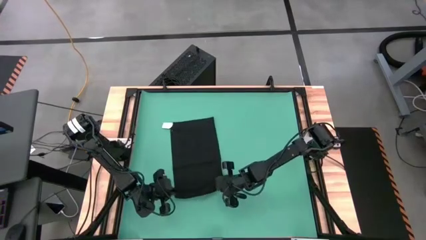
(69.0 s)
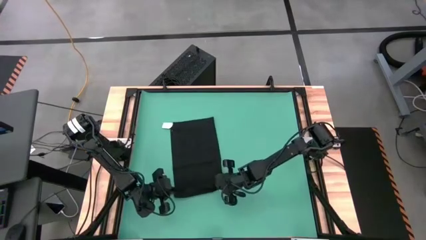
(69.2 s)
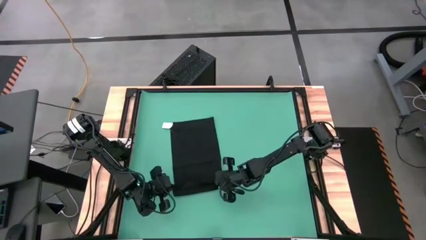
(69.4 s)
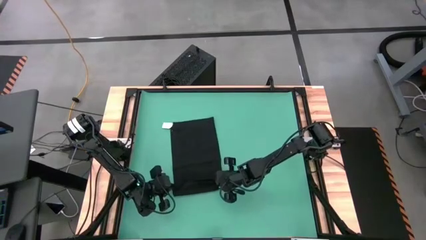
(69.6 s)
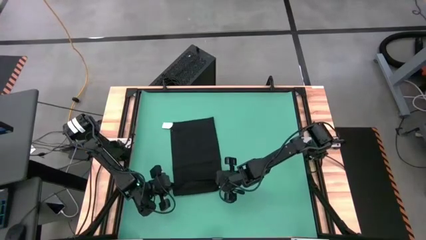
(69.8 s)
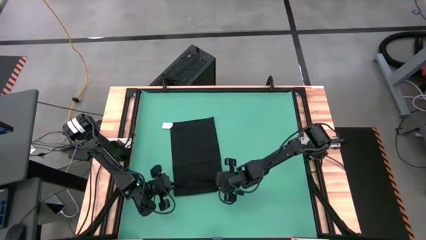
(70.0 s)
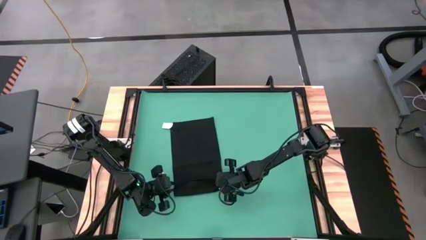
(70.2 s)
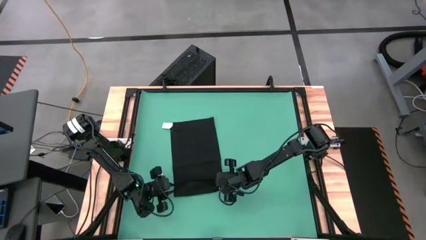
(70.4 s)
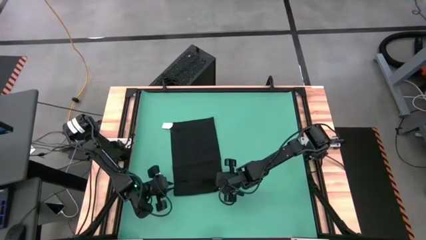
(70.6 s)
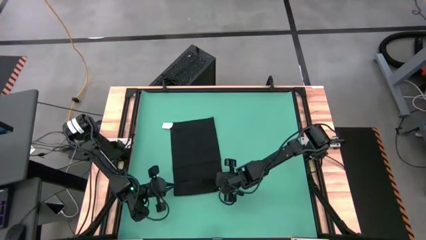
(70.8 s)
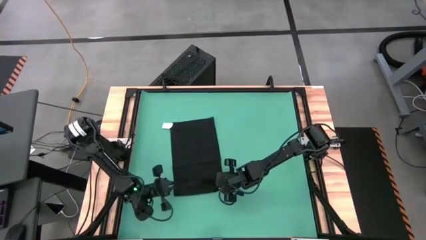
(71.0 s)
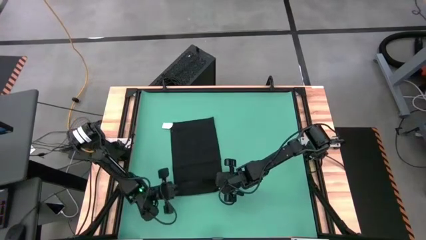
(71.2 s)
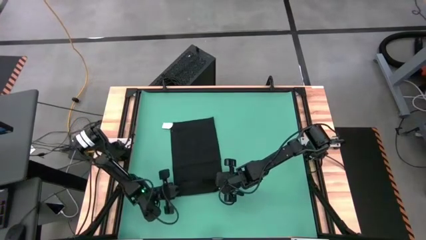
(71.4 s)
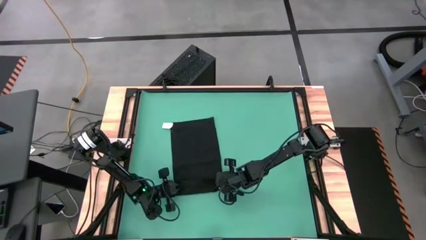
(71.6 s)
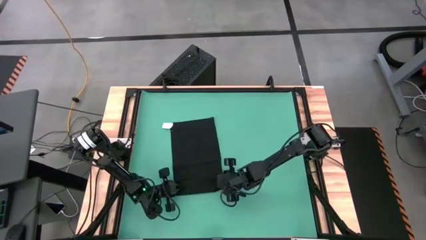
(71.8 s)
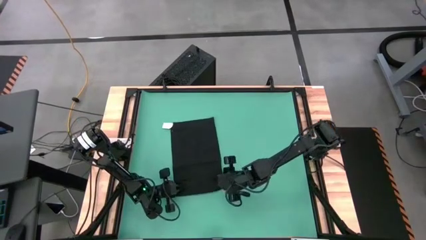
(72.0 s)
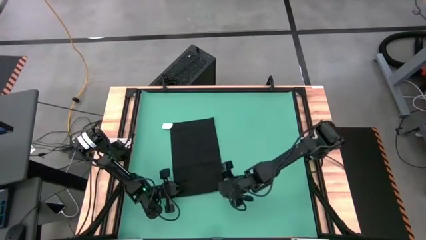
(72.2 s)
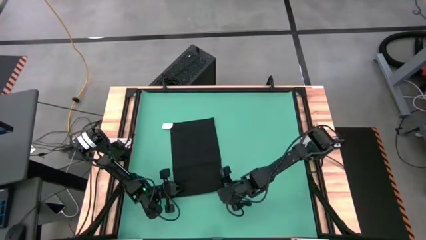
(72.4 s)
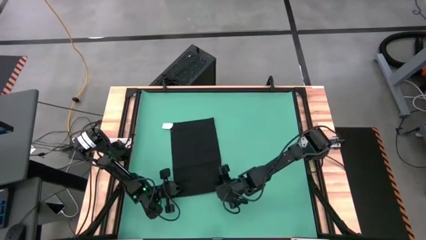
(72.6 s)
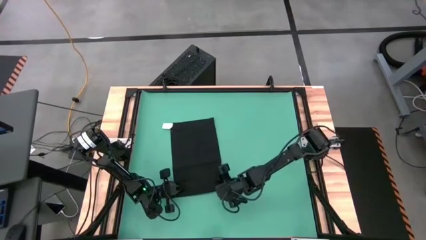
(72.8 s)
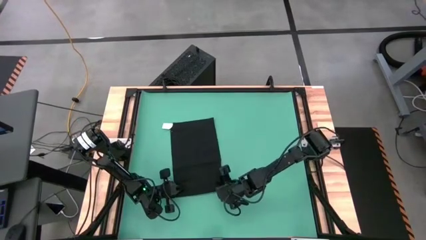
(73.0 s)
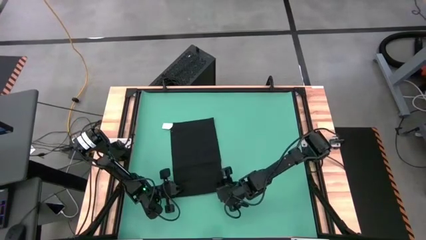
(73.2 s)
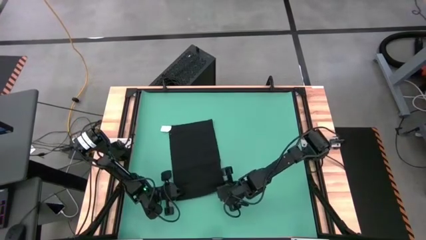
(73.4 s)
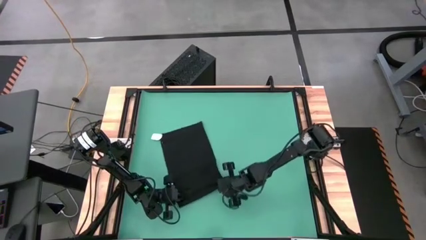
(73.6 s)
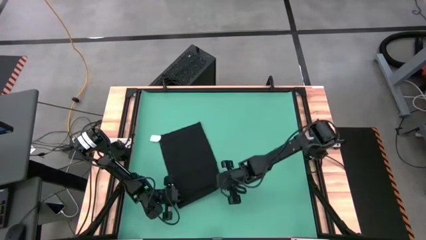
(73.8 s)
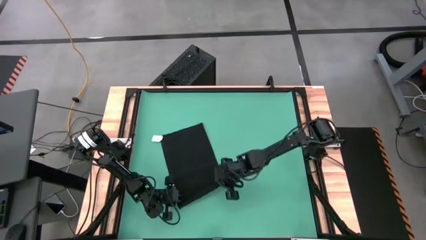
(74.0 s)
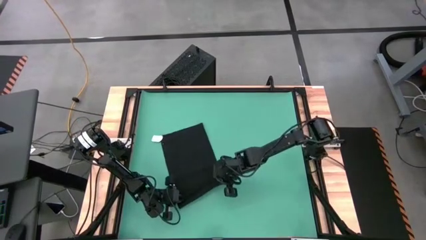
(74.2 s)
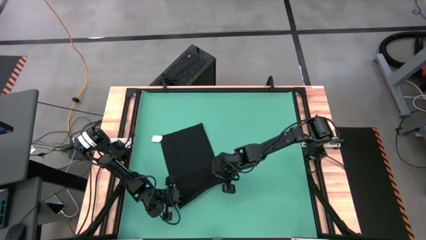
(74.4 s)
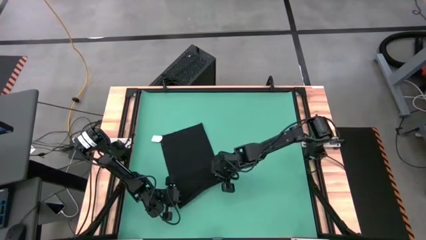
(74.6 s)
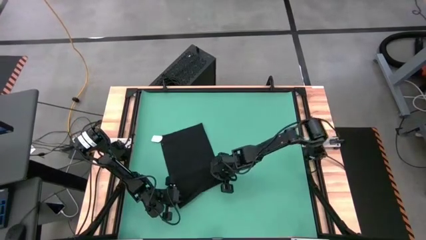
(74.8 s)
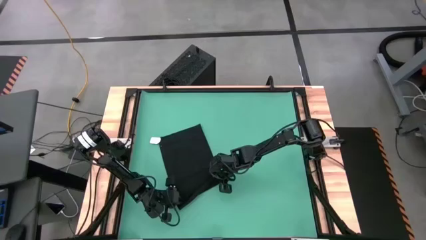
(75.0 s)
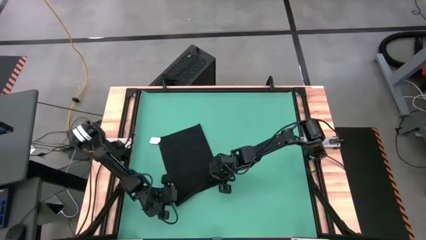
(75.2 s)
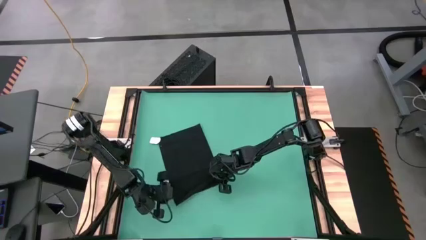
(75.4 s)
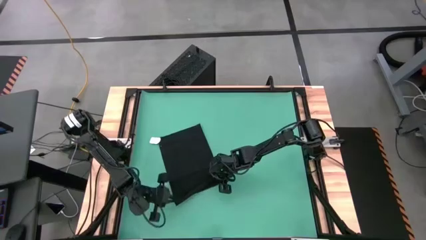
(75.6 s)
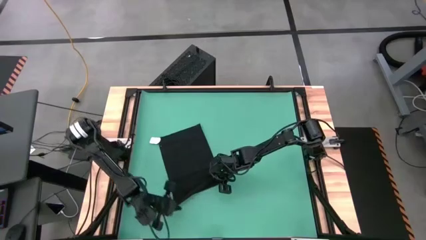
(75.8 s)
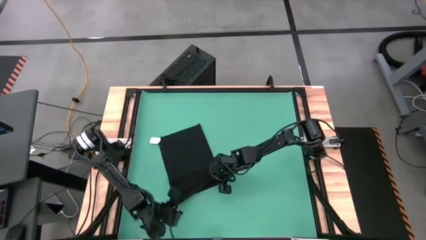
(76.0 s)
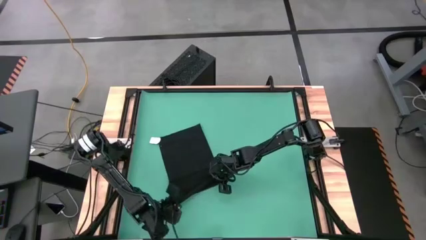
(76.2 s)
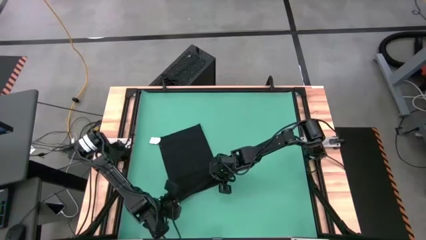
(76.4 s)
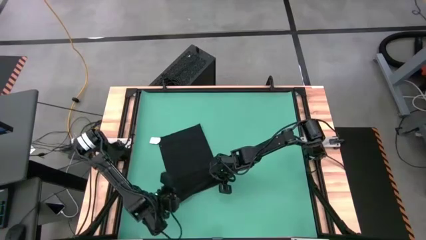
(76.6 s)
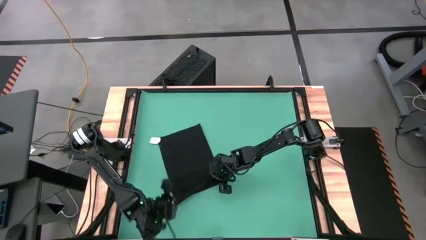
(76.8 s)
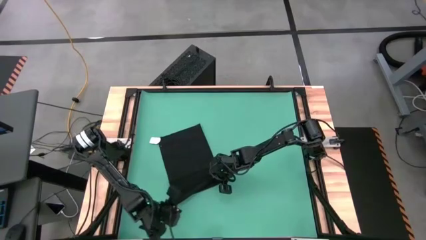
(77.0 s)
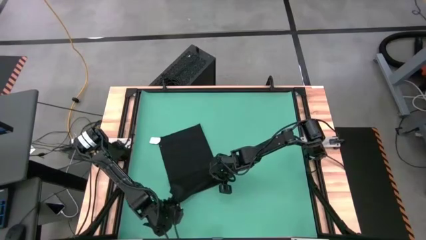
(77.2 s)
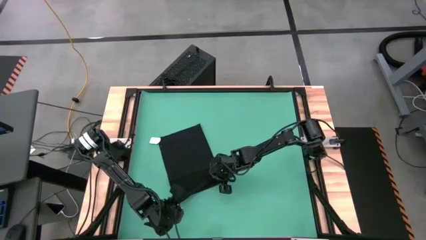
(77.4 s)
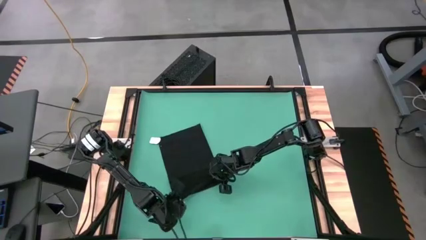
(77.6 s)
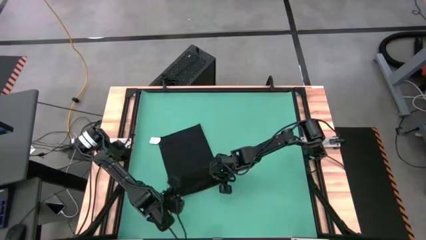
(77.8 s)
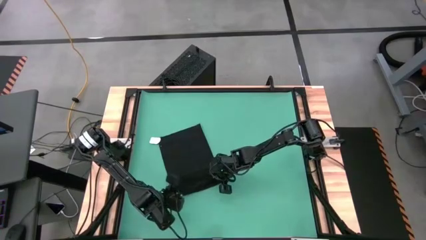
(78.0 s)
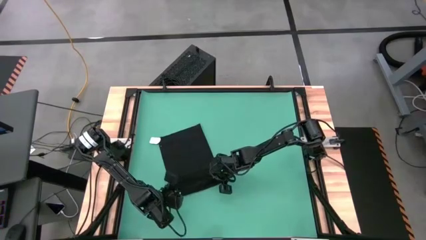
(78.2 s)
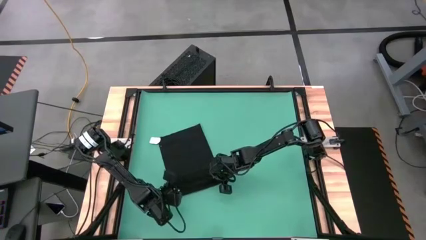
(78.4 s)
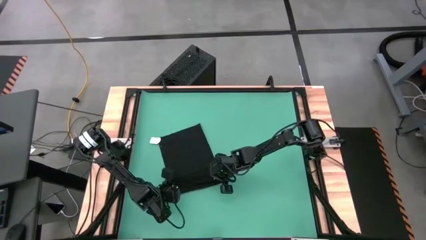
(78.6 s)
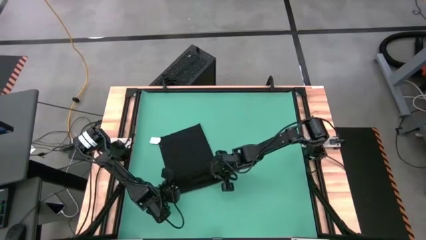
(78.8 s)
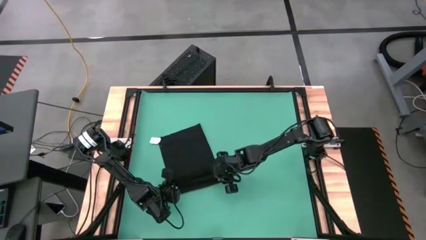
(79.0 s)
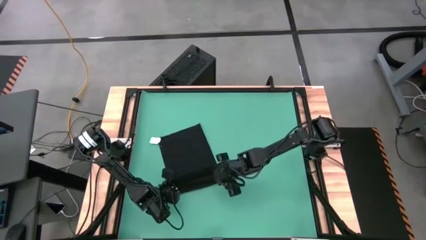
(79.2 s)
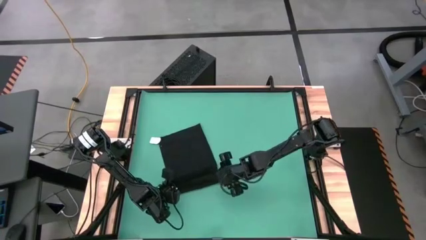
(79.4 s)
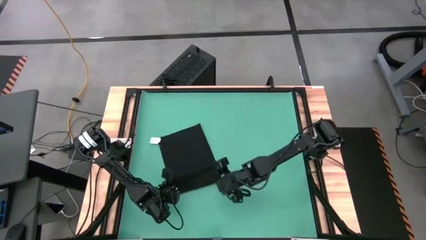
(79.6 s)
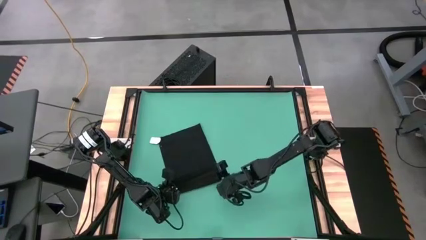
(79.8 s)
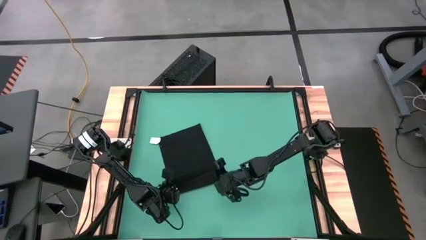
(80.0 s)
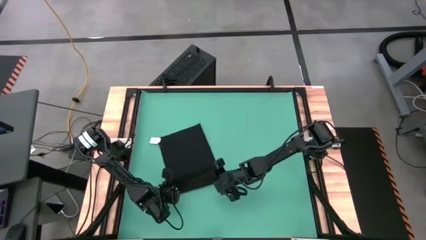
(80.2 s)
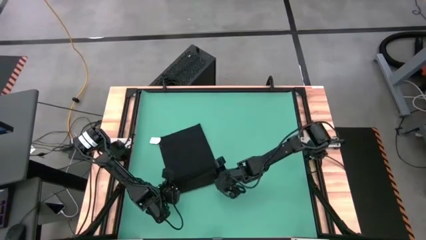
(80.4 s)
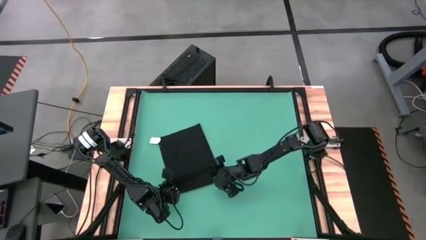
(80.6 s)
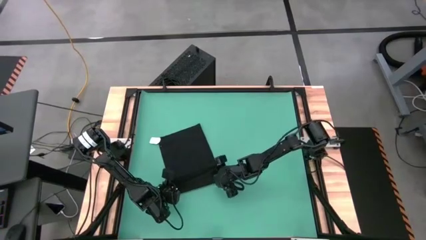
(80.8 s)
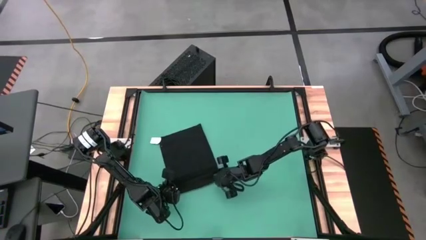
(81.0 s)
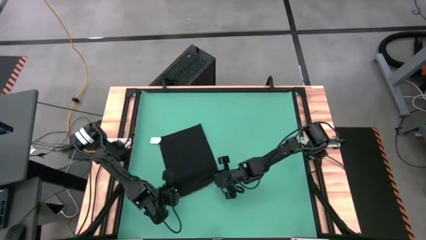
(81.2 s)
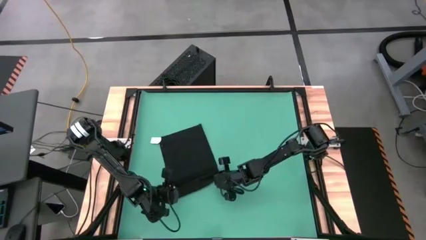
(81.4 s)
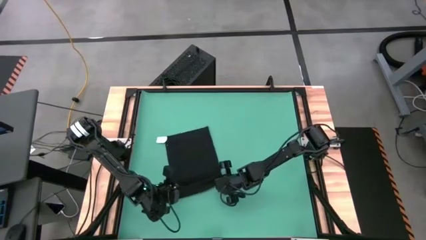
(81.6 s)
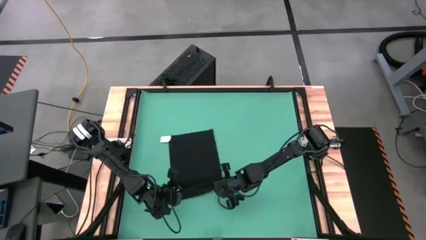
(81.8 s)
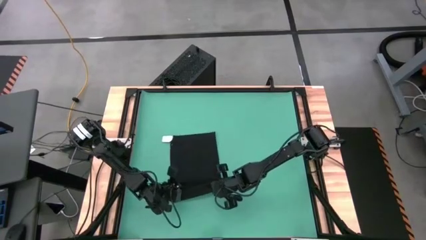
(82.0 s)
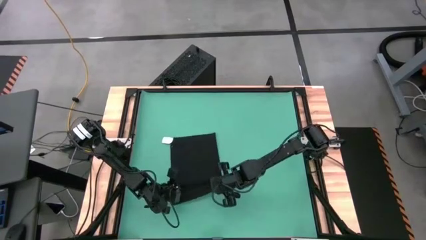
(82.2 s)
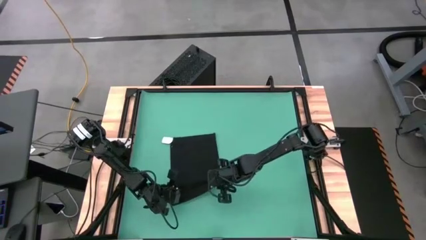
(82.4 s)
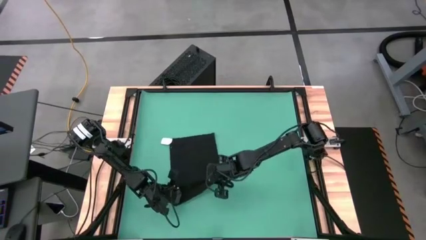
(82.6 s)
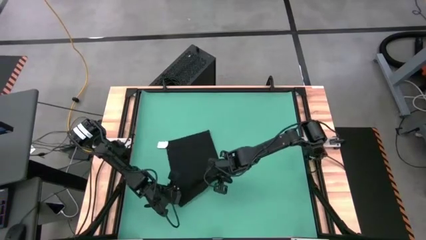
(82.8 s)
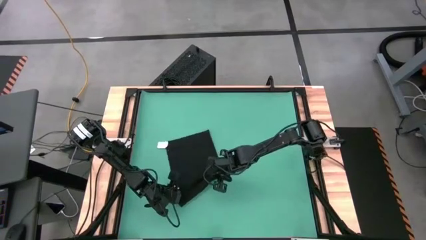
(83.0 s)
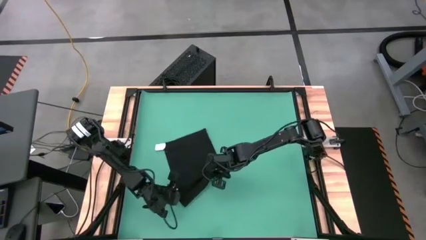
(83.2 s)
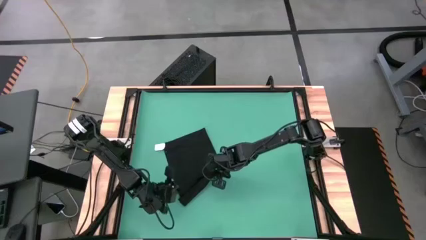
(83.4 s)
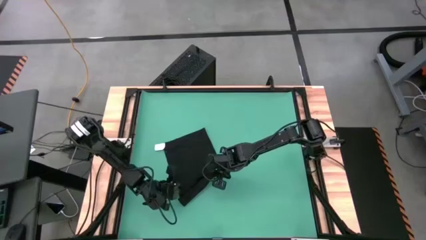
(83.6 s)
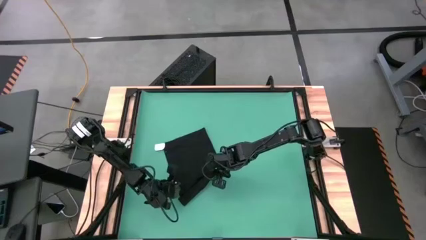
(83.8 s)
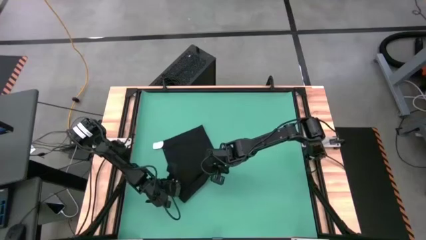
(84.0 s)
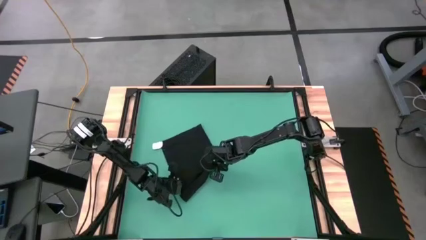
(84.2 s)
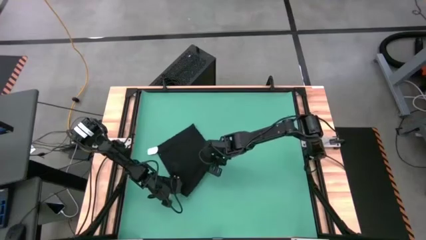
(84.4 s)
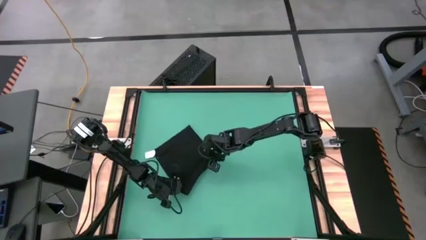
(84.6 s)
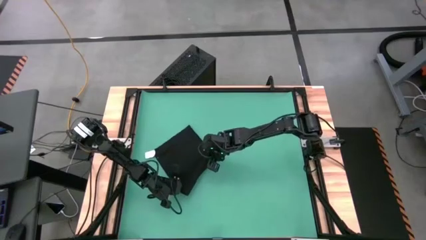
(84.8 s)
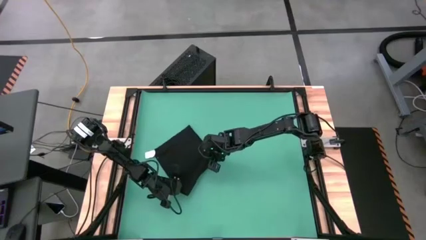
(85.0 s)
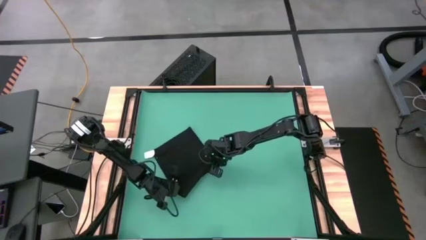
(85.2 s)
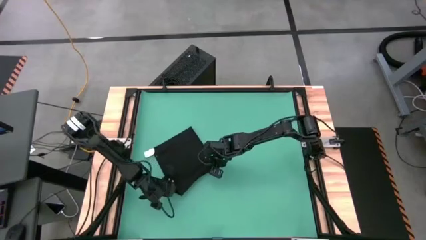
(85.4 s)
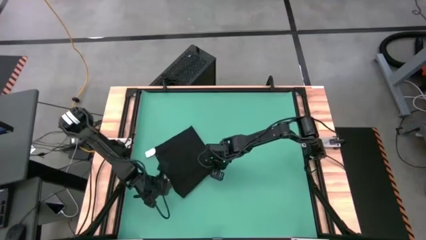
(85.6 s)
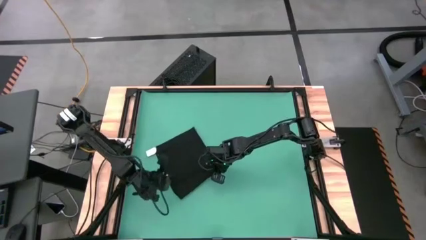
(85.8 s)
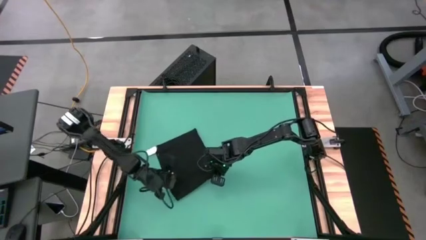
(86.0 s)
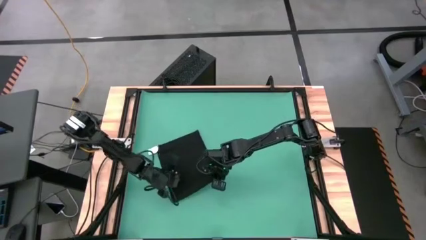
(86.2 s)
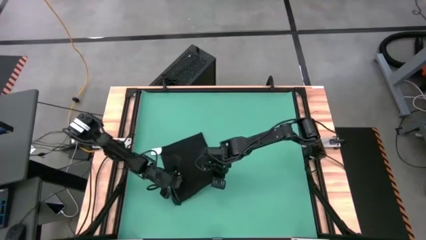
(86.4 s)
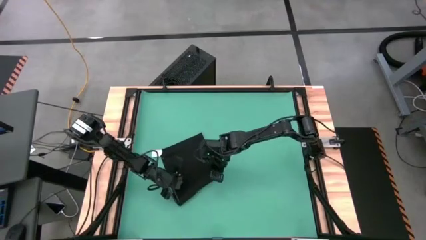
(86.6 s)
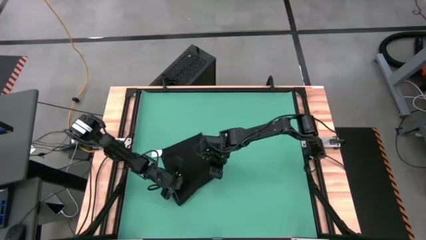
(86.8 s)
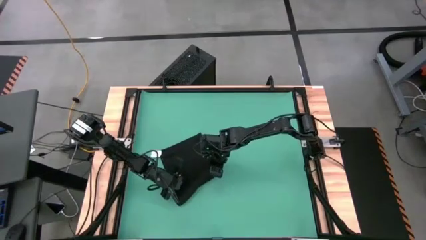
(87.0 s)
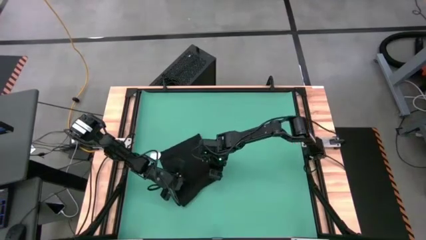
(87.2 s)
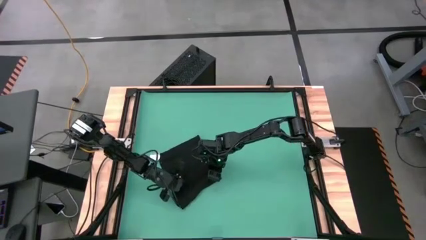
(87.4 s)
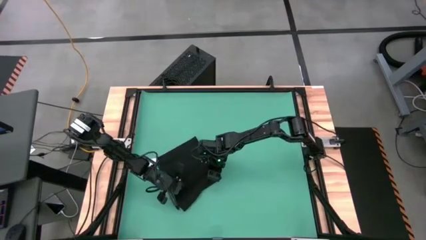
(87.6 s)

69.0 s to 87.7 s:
Task: Roll towel into tight, uniform cylinder
Roll the towel
